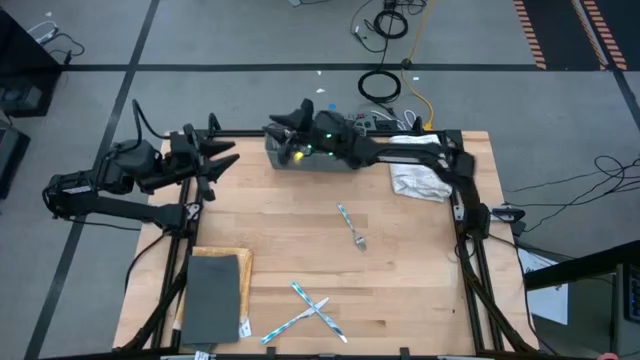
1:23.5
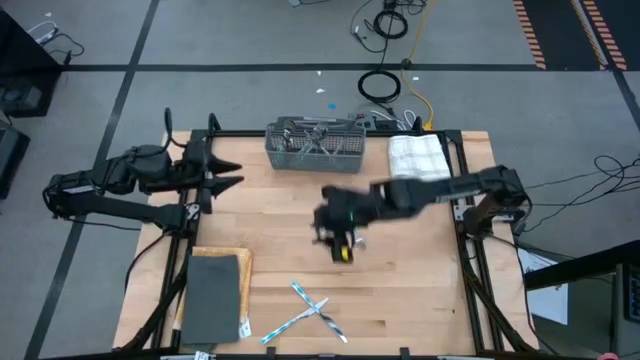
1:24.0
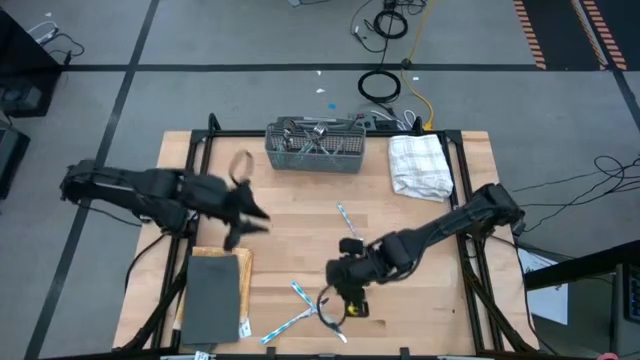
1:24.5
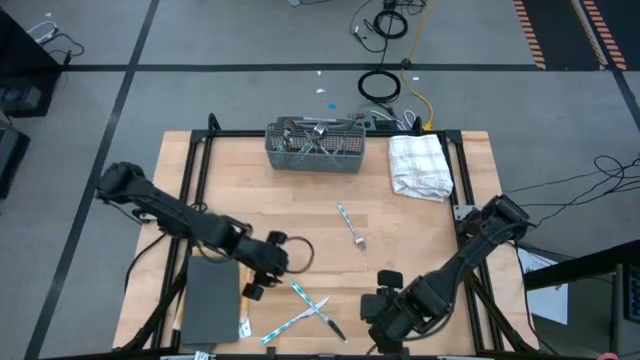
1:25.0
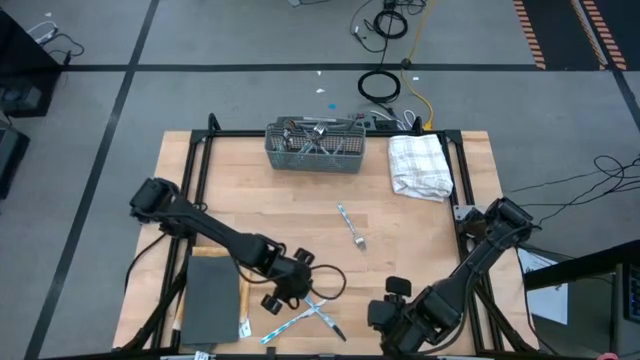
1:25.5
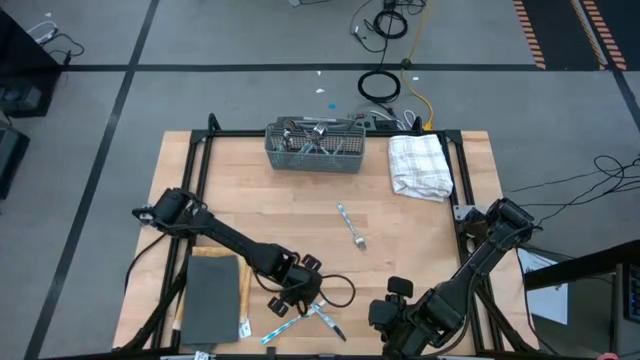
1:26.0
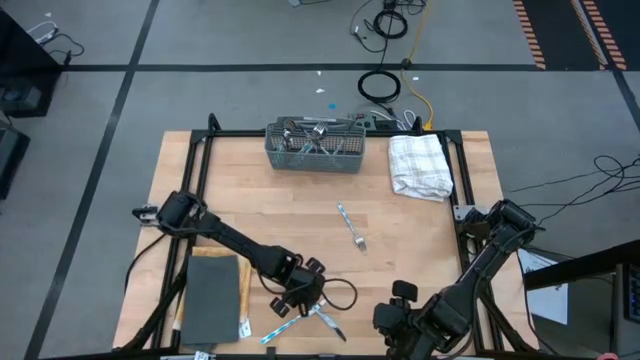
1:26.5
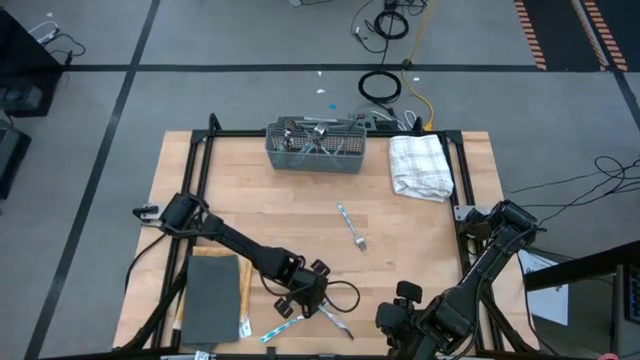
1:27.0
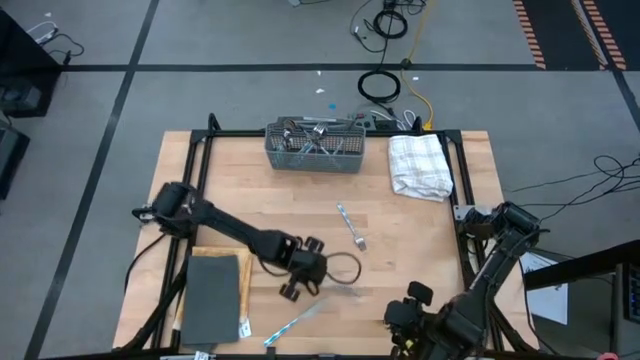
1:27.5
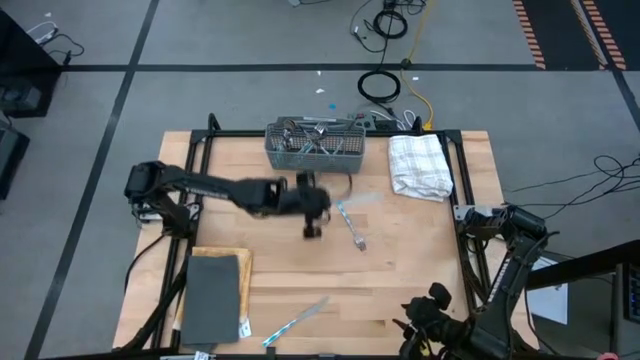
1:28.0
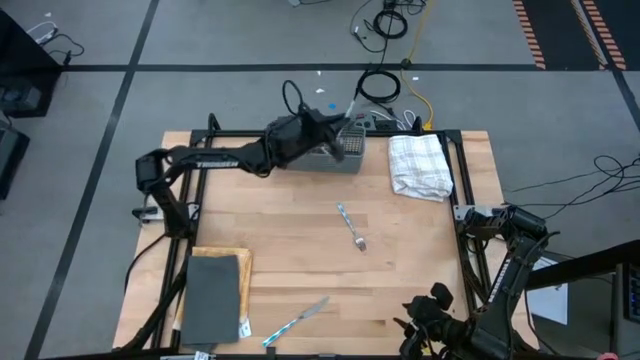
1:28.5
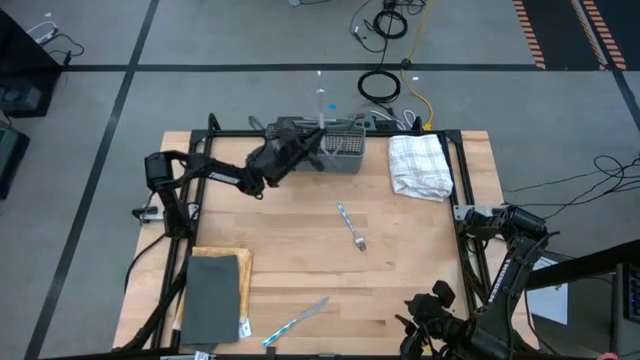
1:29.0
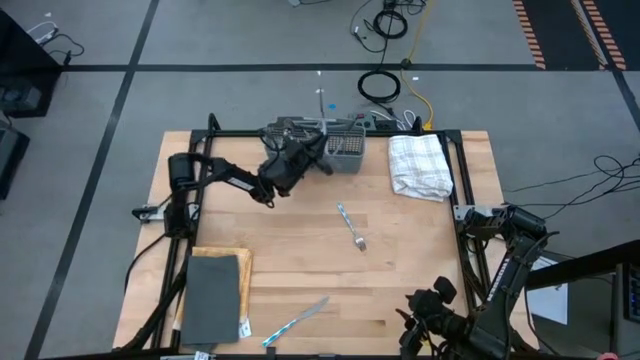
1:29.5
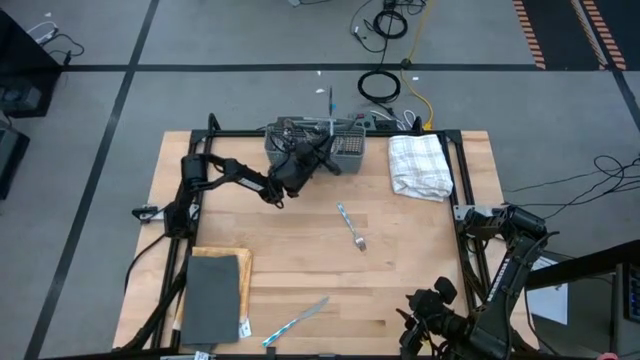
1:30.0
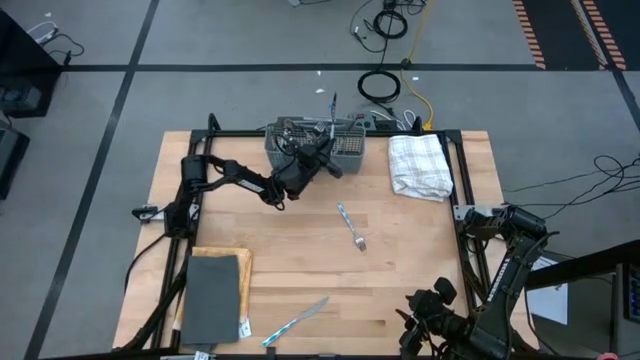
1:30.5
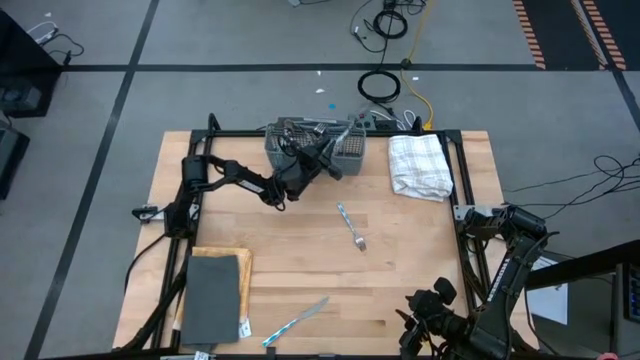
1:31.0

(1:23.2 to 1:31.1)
Task: Sort silverware
Put the blue knife into the silverware basket

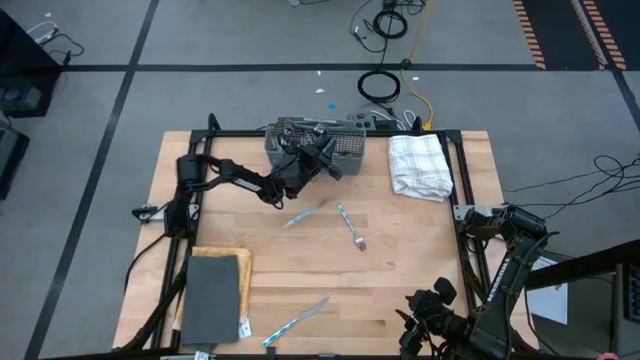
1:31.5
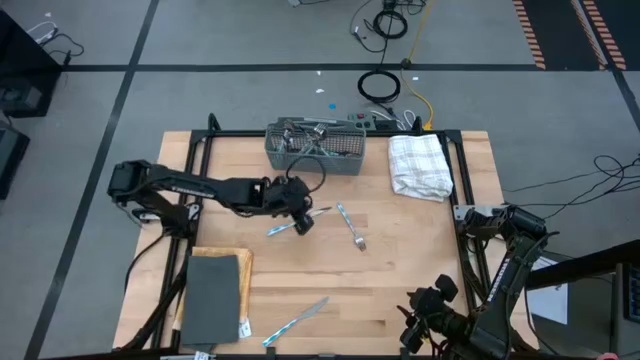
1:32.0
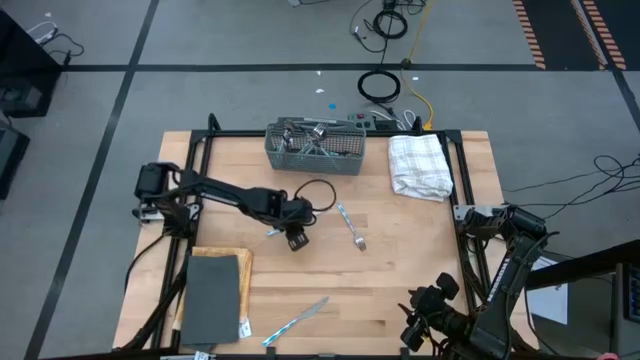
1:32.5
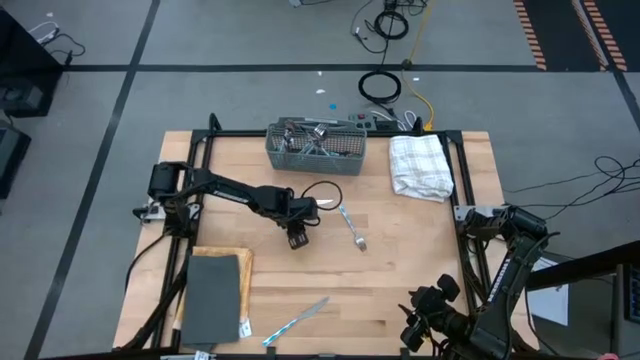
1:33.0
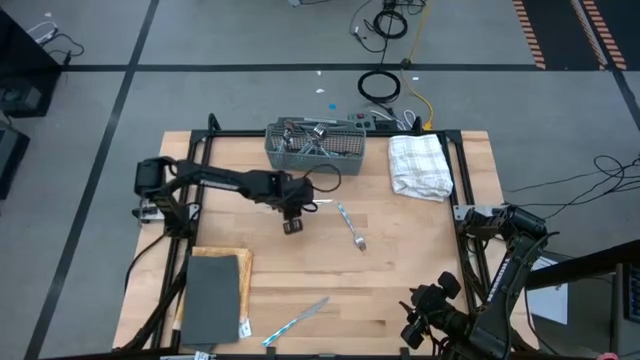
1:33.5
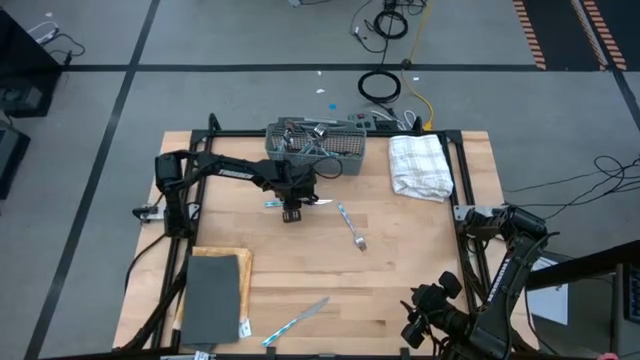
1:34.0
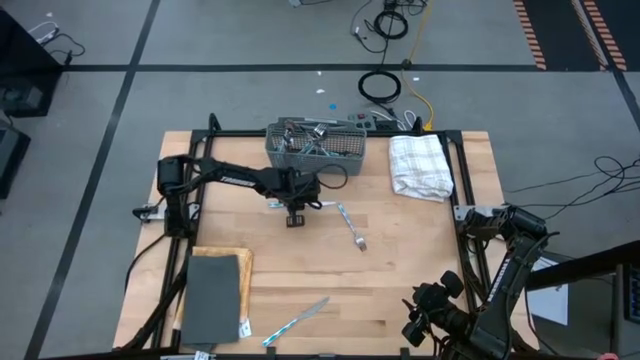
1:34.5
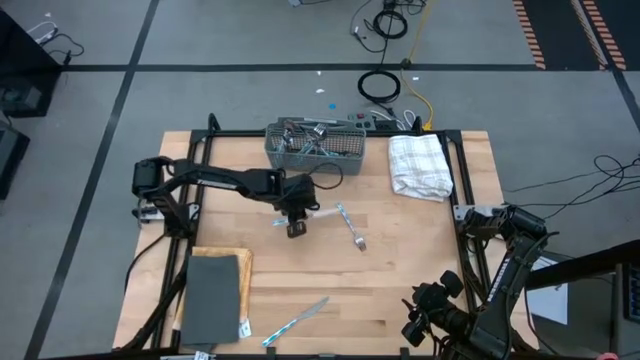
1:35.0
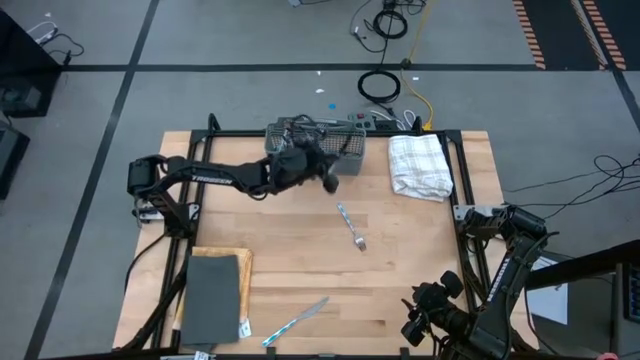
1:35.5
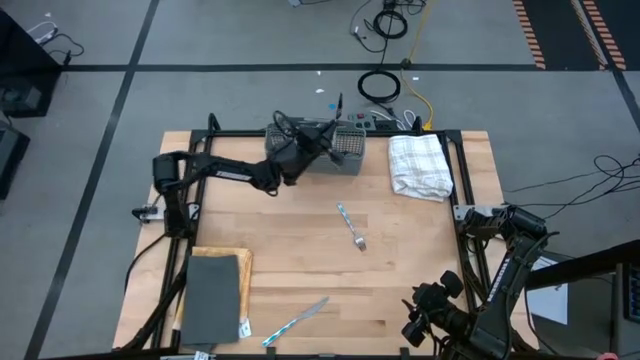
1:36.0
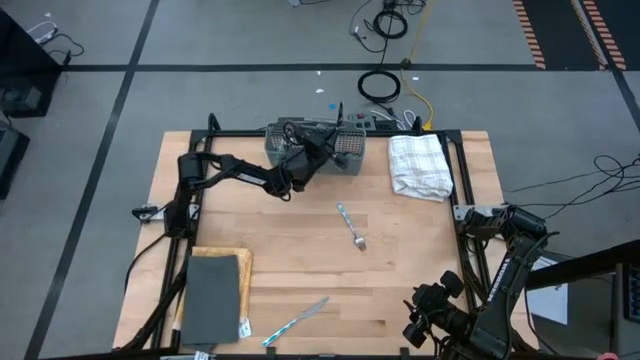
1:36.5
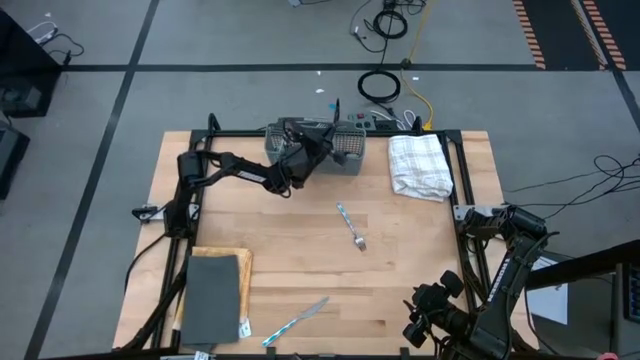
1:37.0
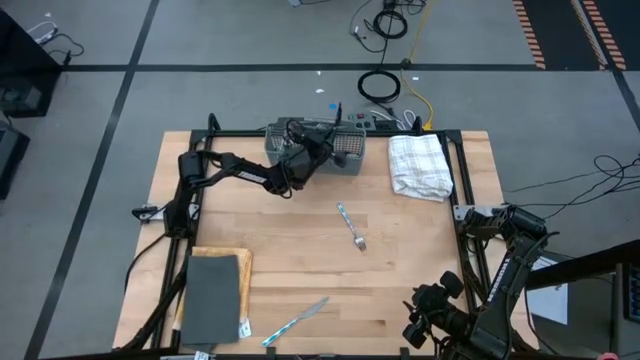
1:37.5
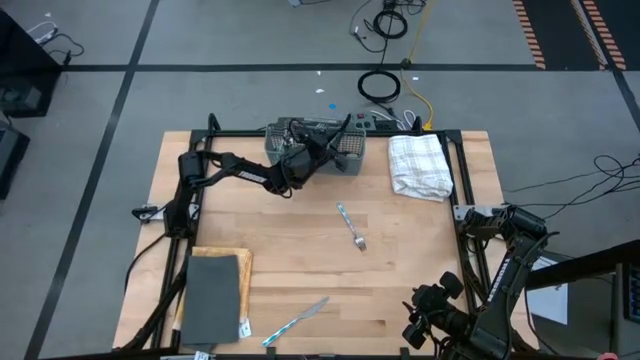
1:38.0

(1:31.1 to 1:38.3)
Put the blue knife into the silverware basket

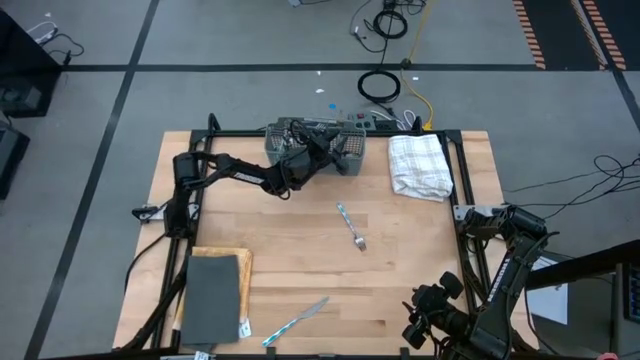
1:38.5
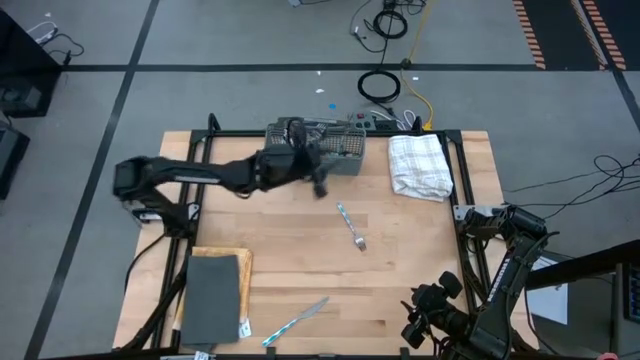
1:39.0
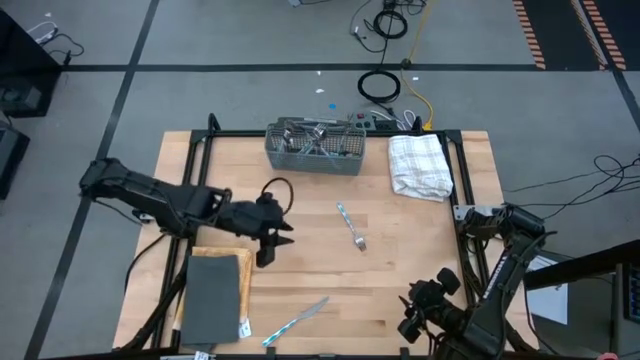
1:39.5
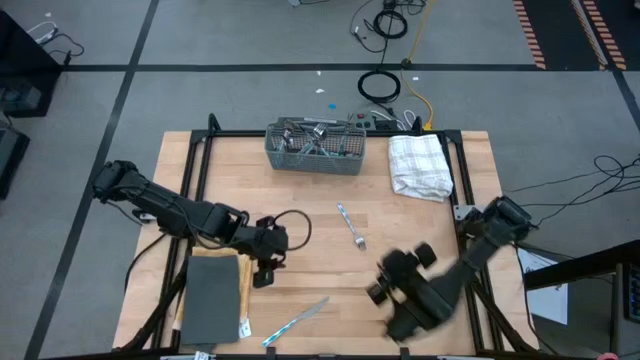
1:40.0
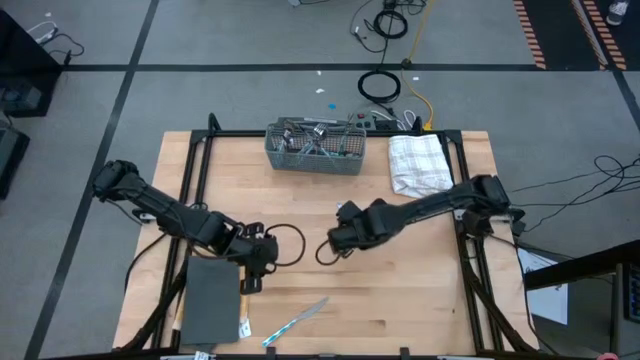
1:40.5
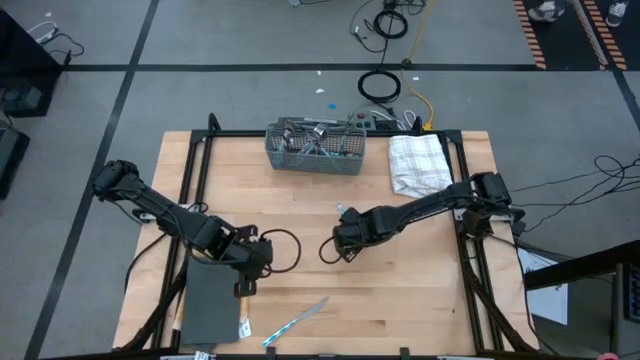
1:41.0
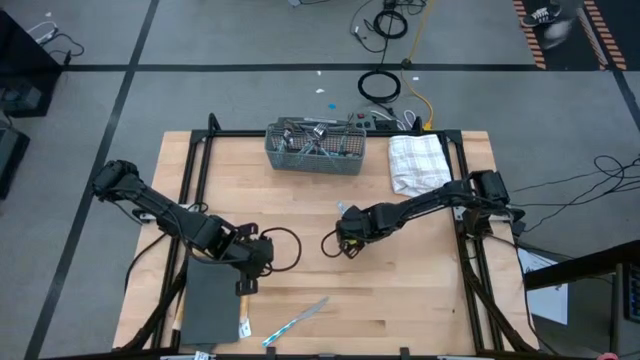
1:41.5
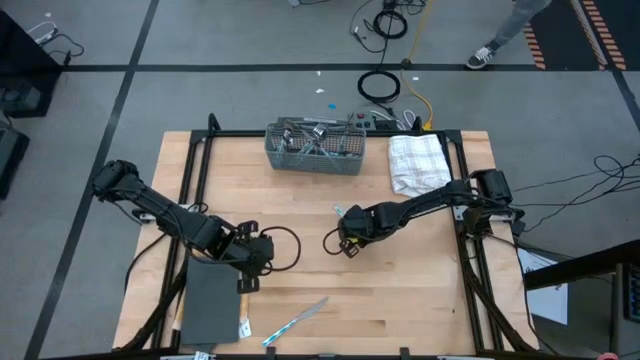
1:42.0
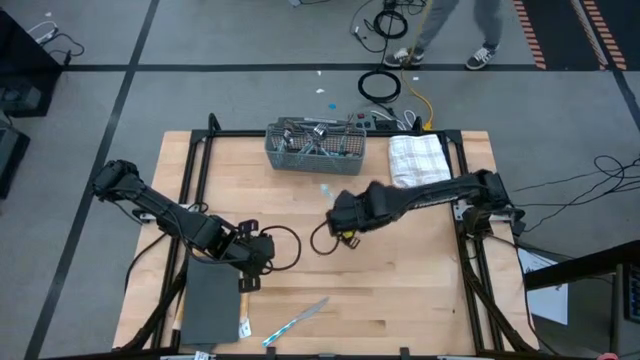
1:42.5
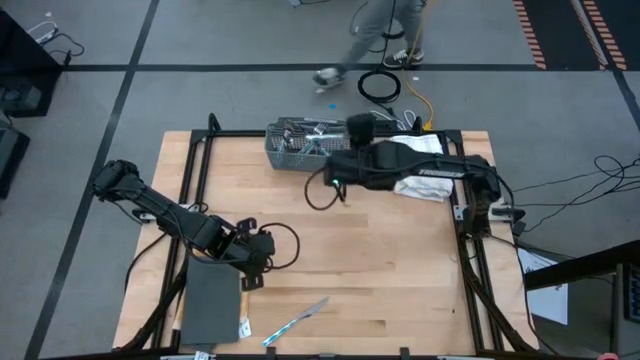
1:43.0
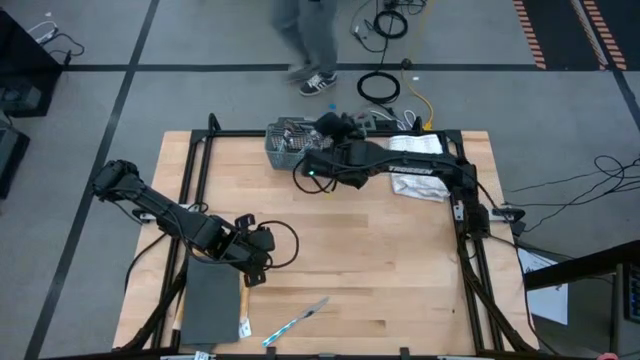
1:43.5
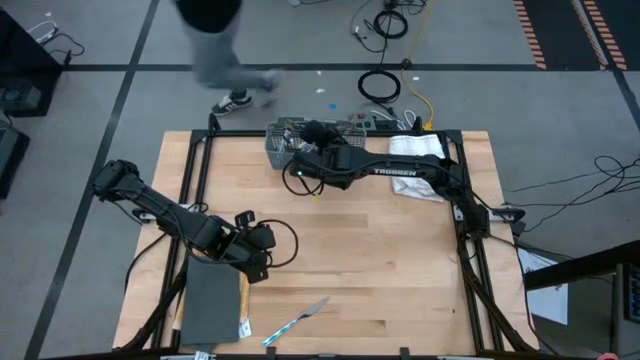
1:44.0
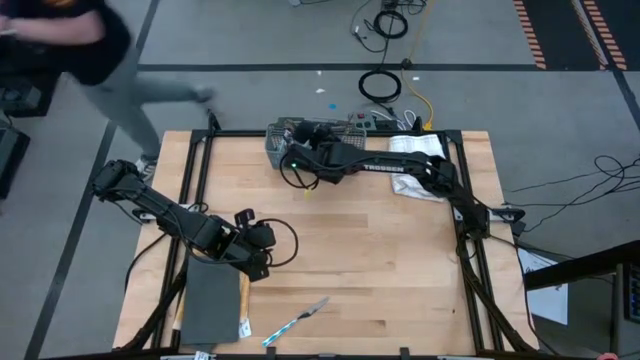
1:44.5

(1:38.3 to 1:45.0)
Put the blue fork into the silverware basket
